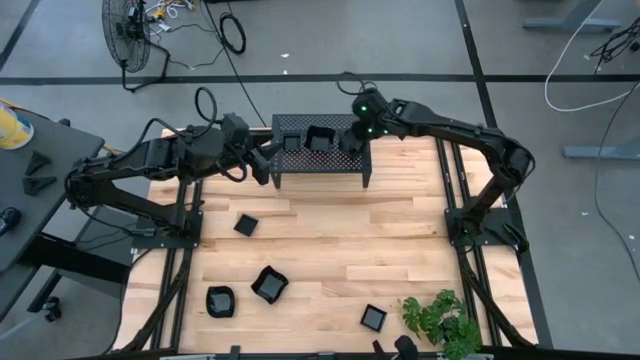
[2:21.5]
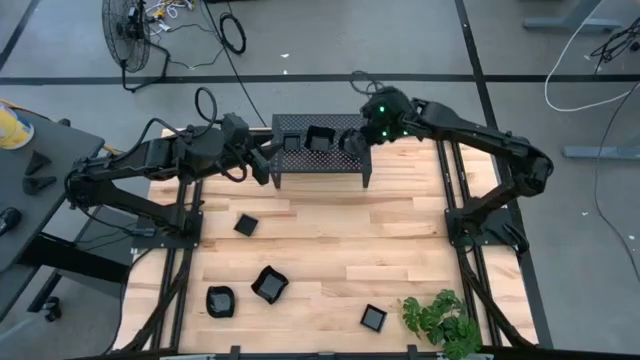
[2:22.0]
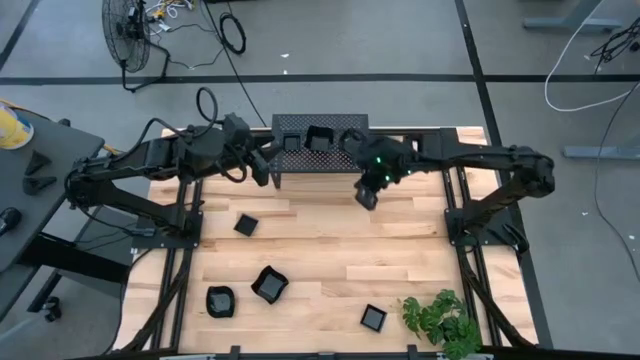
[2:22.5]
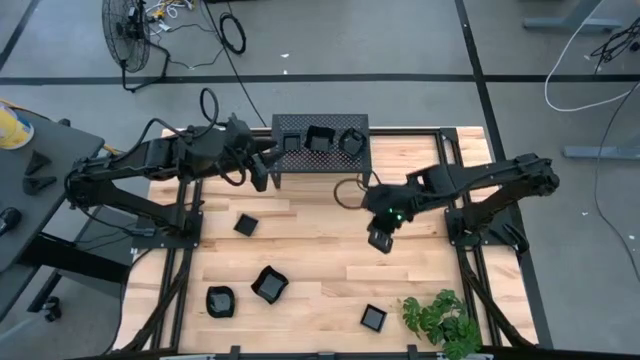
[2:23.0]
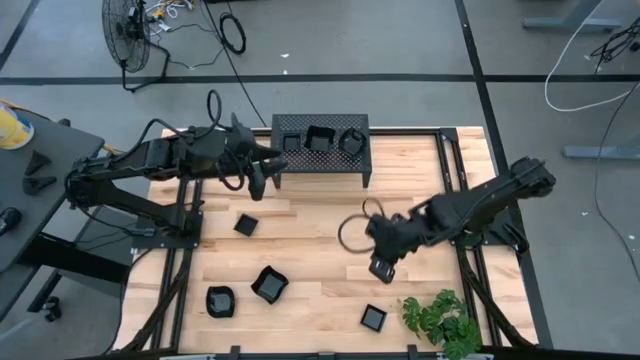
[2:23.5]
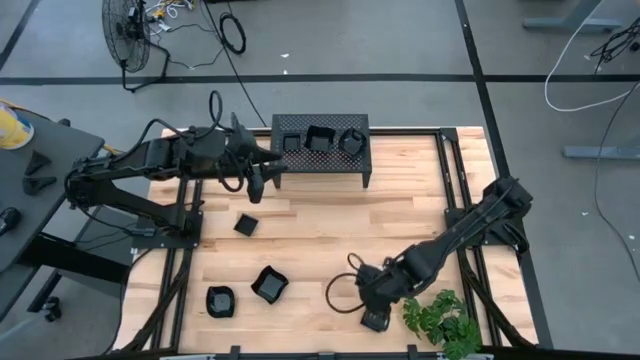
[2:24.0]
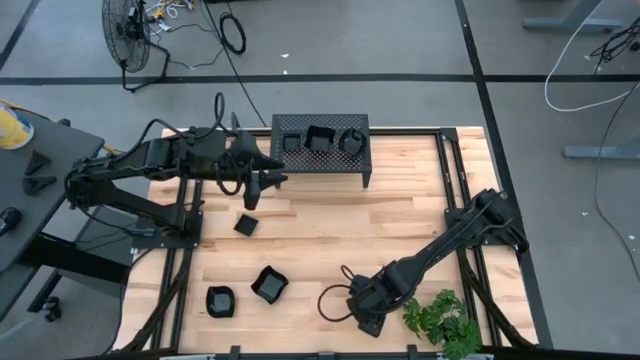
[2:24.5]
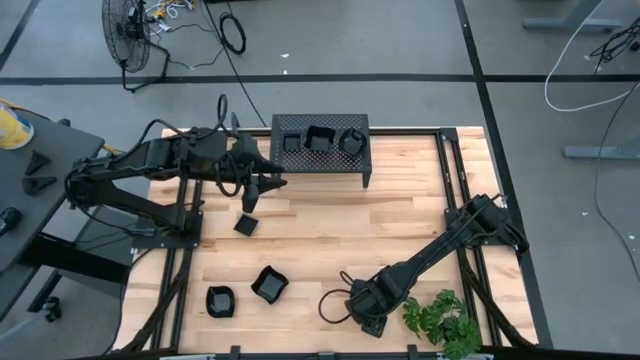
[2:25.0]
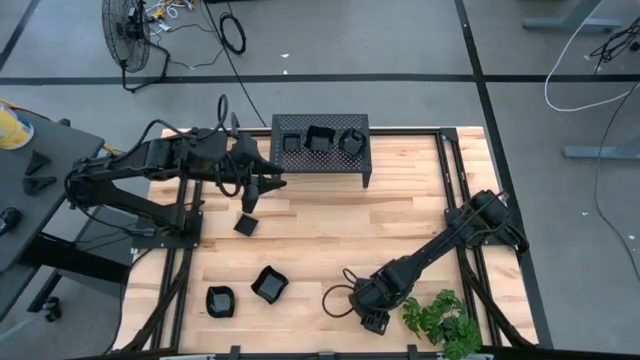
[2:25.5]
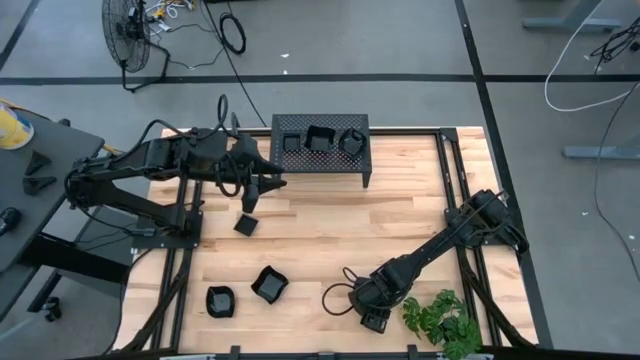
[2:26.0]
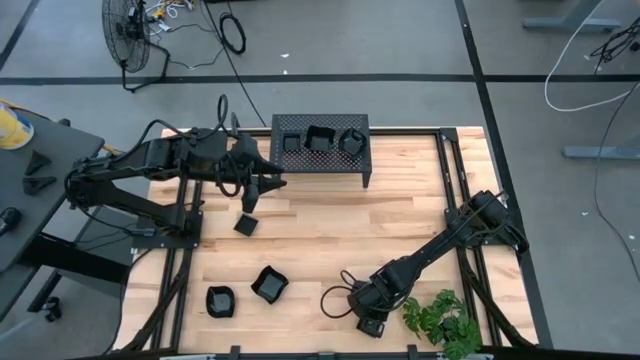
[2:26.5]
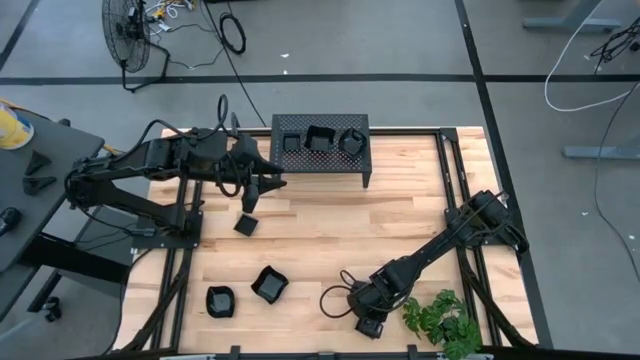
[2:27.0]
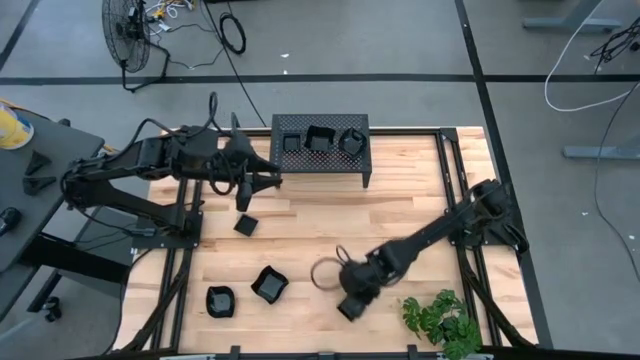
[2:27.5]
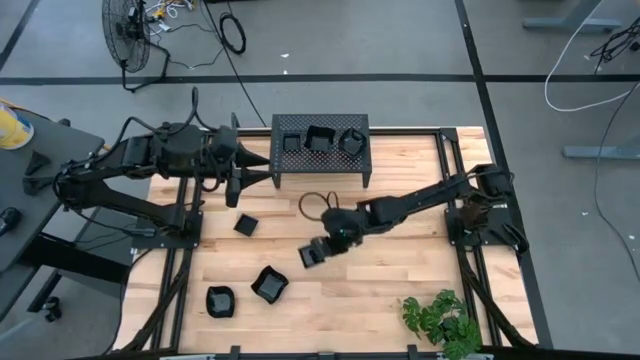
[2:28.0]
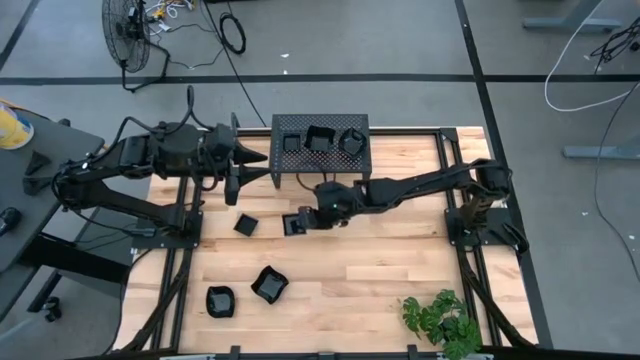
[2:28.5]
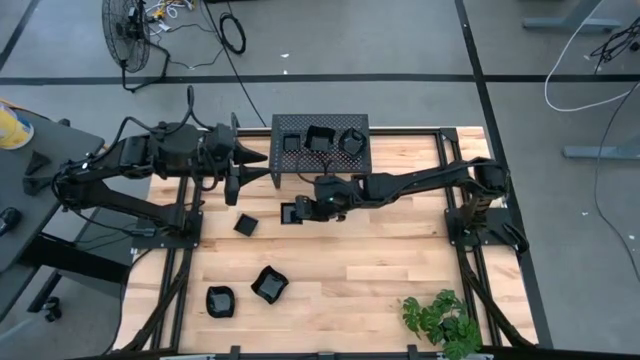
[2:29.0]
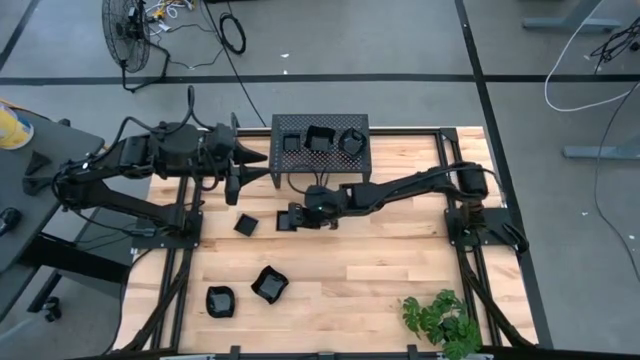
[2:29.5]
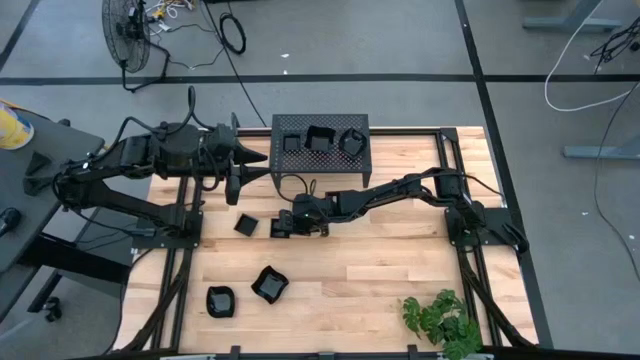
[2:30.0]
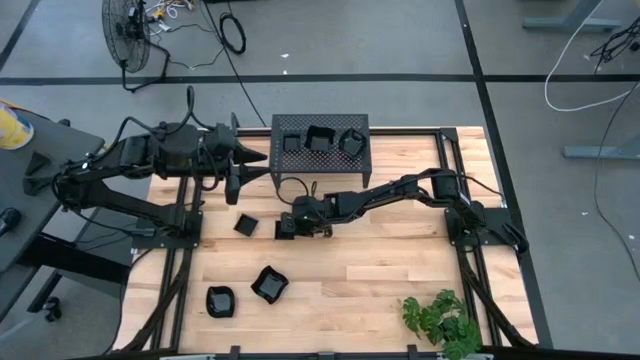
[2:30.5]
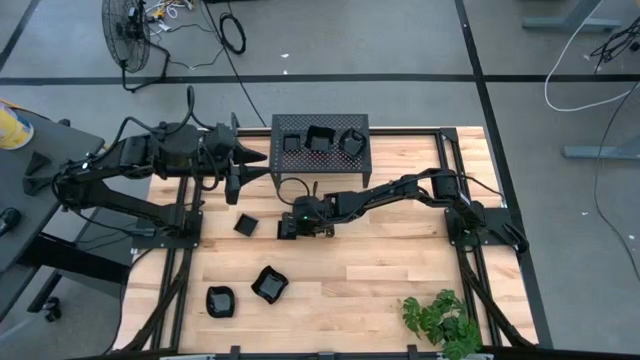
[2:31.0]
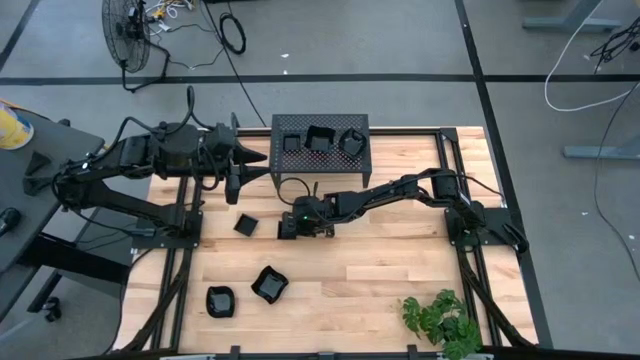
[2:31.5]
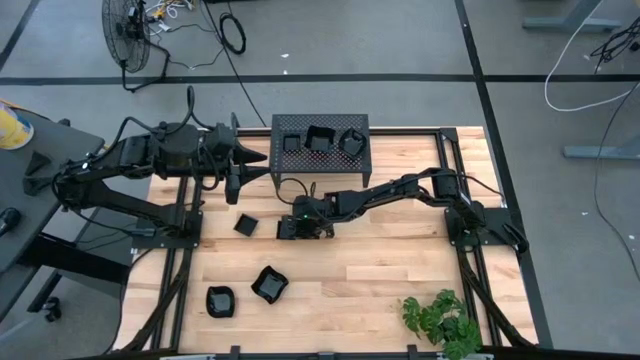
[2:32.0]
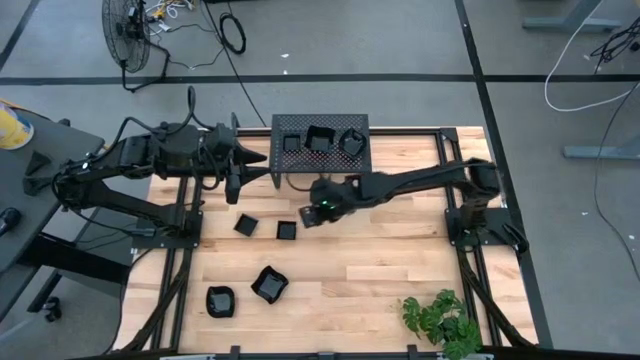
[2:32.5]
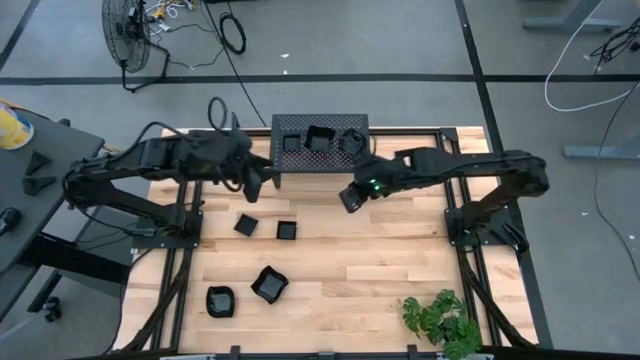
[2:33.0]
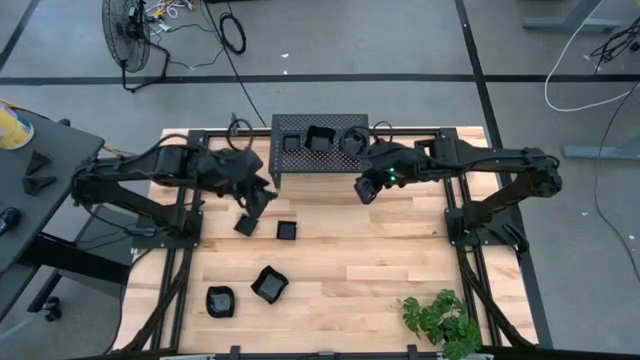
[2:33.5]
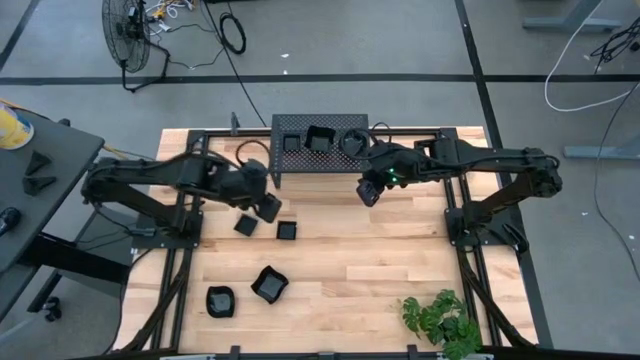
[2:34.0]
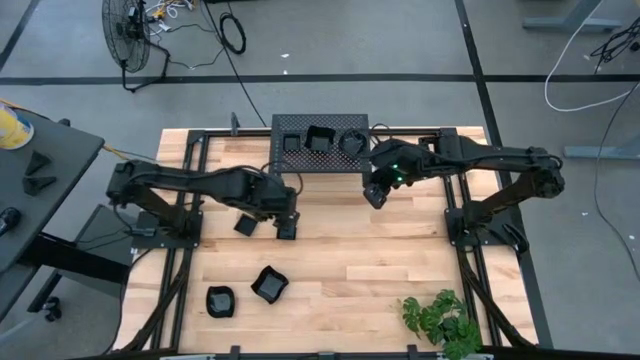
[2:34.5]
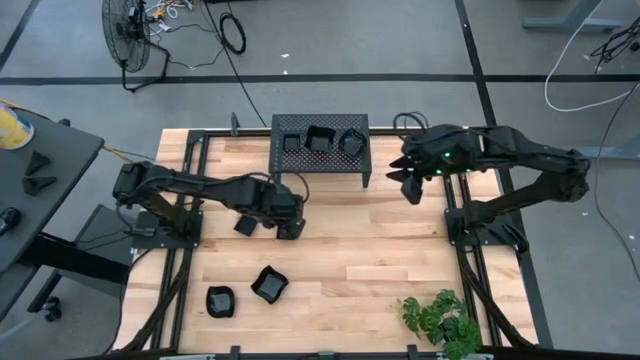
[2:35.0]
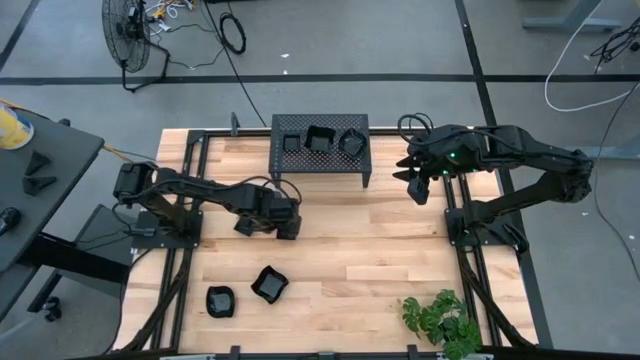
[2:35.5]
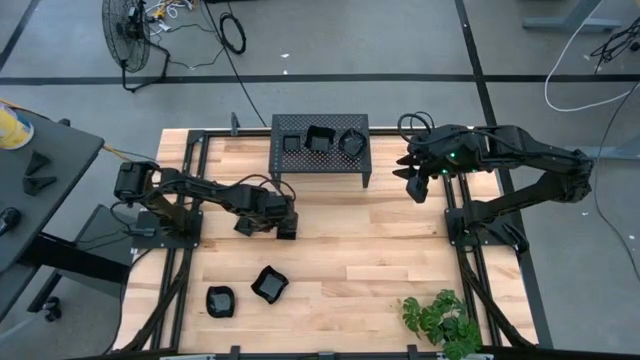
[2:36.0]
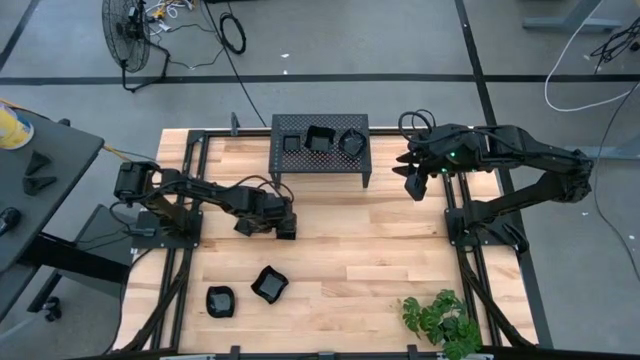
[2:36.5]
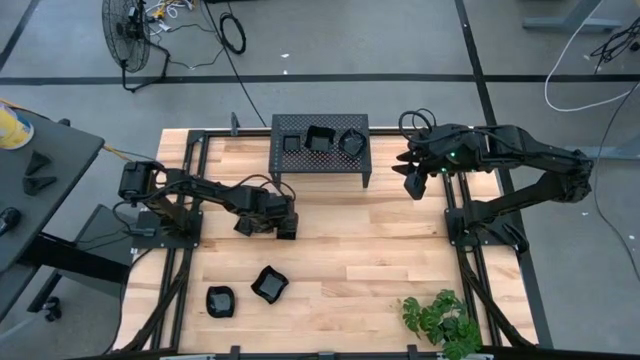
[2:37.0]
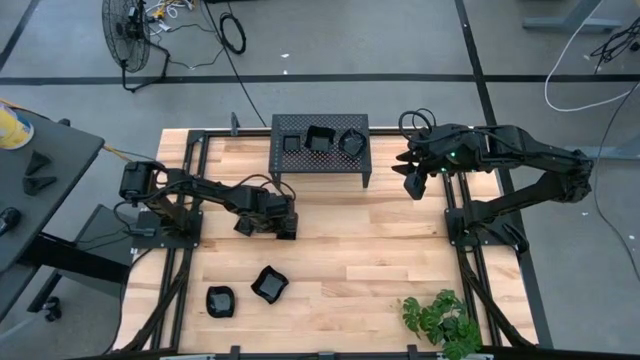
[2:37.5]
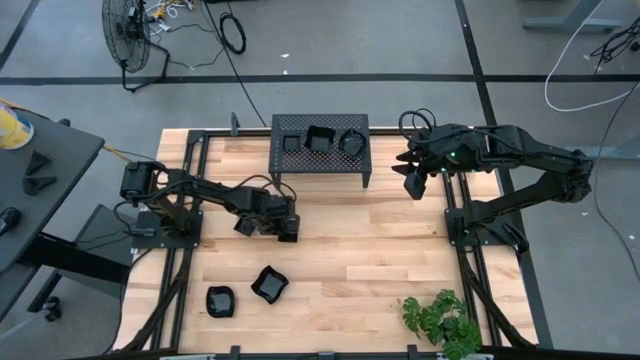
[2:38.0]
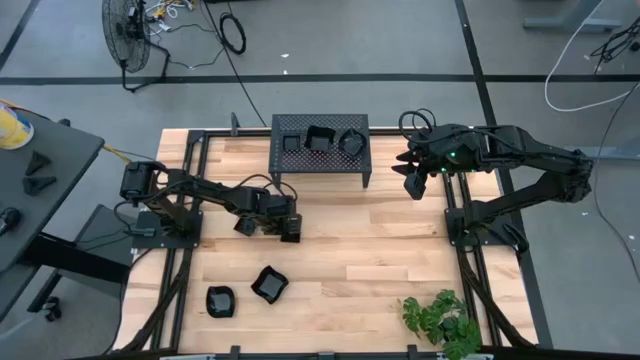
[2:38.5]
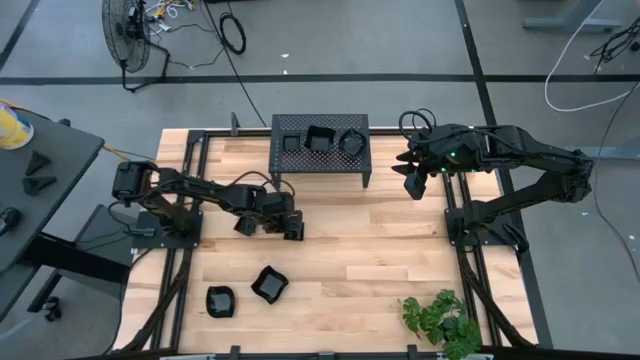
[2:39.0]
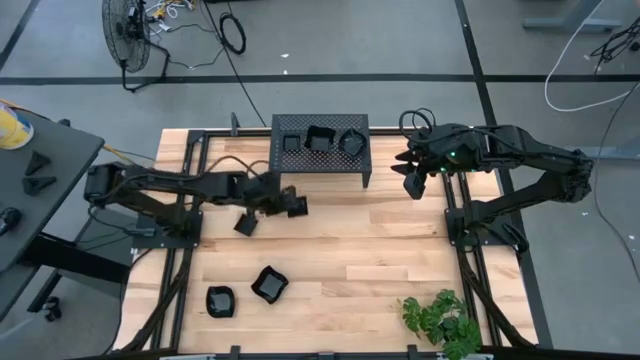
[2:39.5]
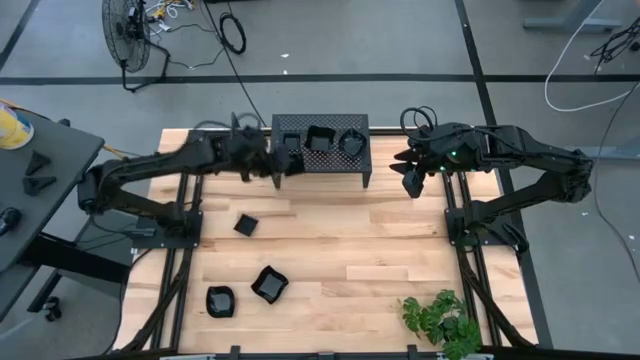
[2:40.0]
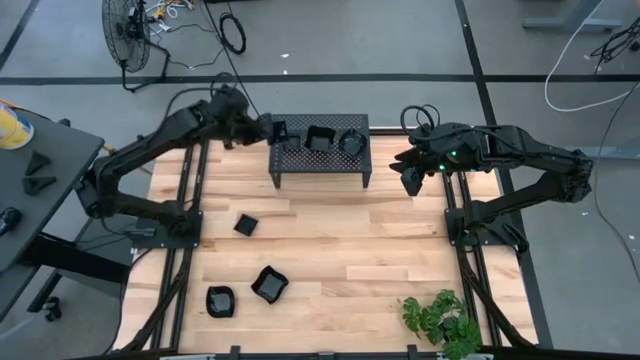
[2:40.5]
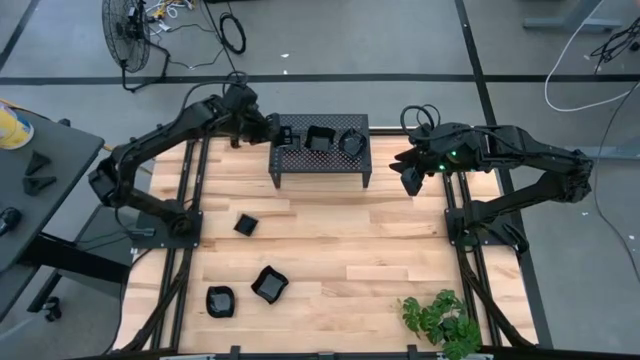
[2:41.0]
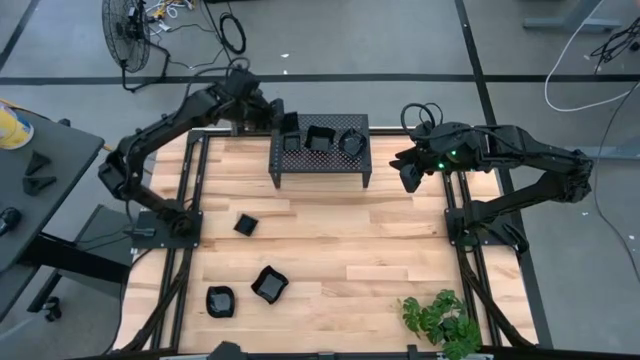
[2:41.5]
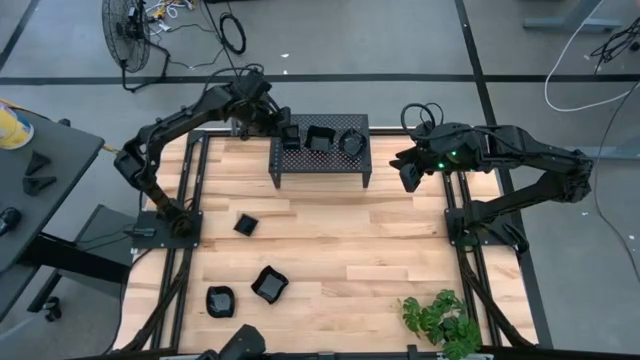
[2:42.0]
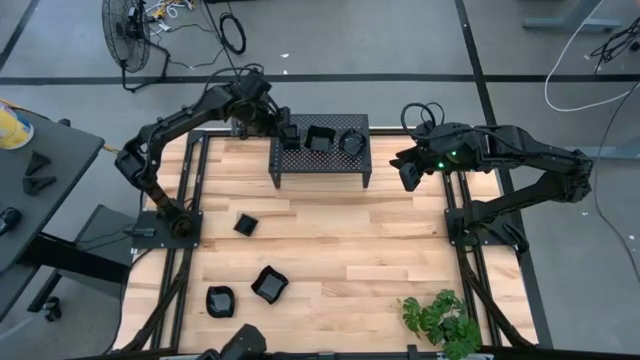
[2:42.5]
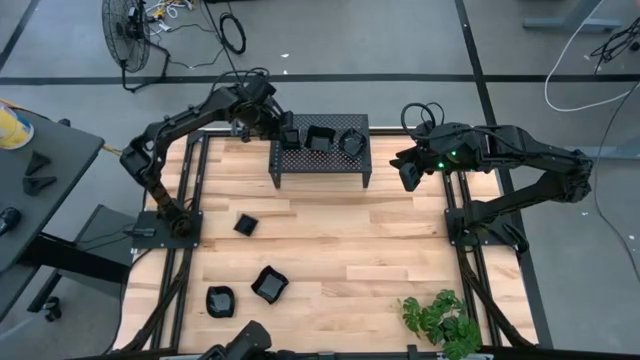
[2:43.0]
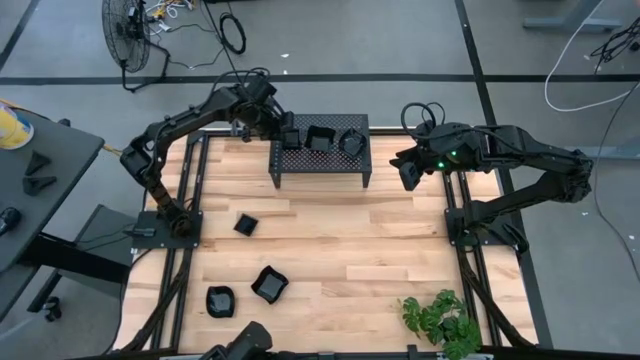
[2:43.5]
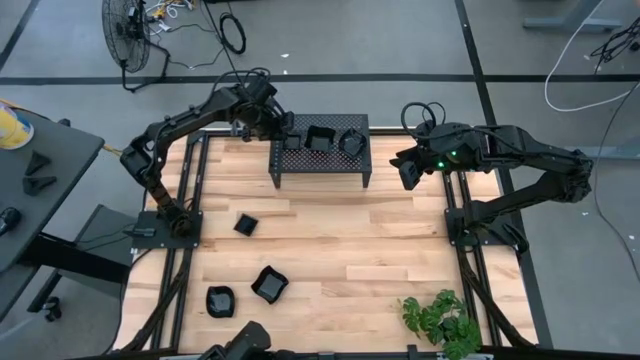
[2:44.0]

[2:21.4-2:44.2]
Task: Pick & Place Mini shaped plates
Stack the square plate on top of the other square plate on the shelf
